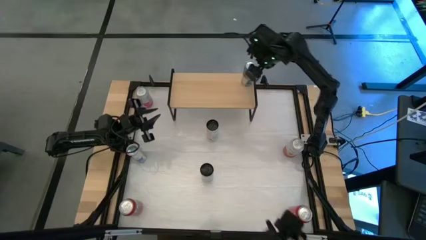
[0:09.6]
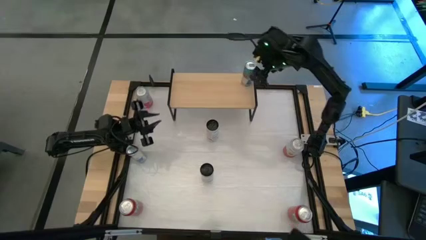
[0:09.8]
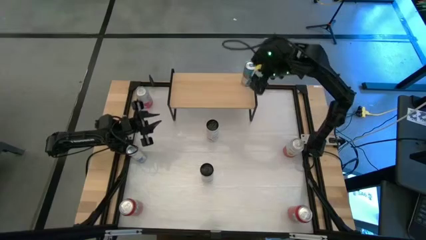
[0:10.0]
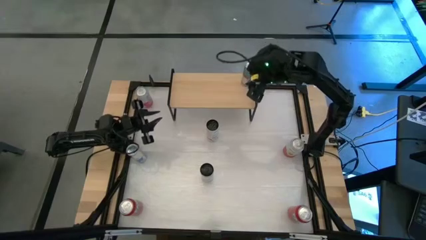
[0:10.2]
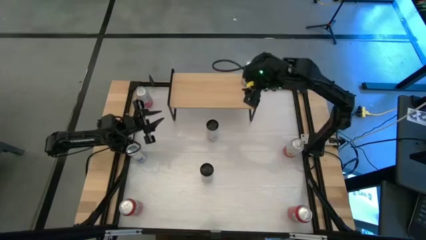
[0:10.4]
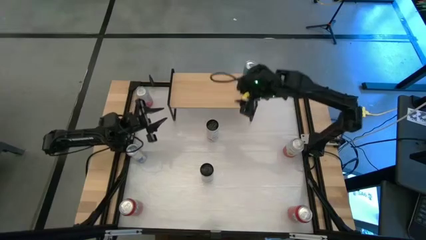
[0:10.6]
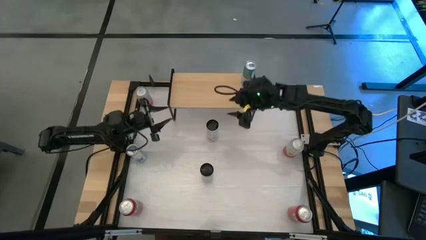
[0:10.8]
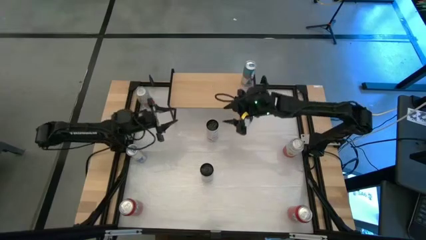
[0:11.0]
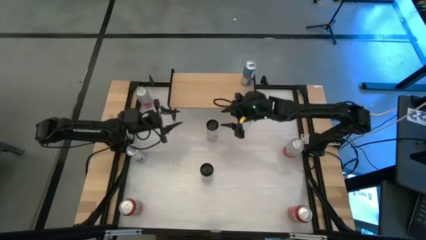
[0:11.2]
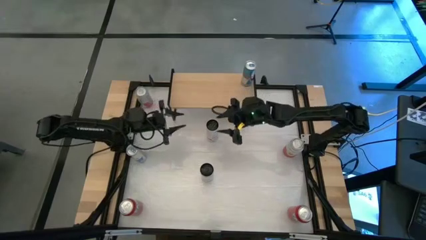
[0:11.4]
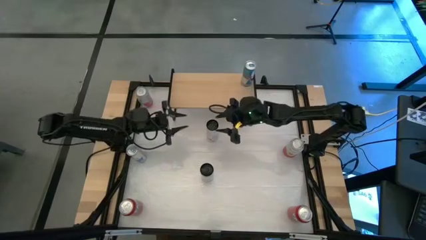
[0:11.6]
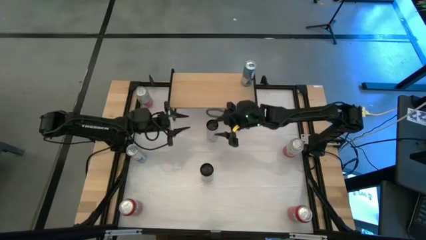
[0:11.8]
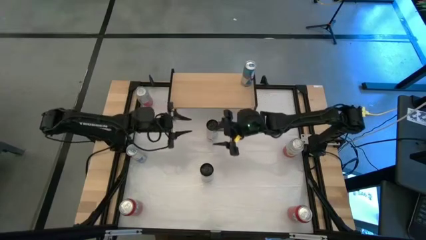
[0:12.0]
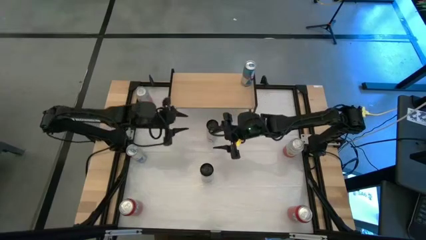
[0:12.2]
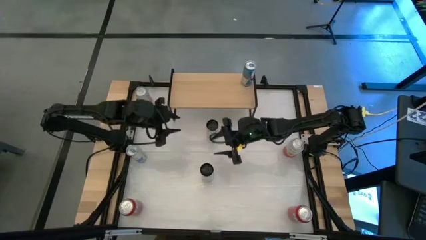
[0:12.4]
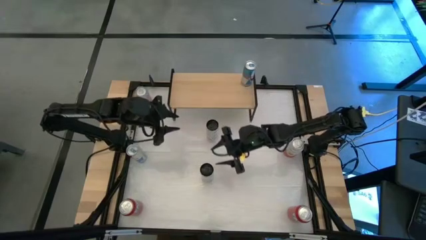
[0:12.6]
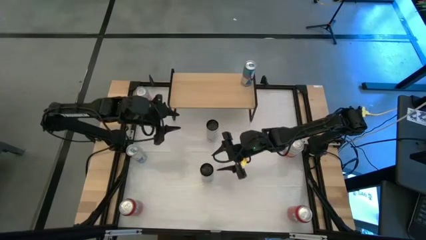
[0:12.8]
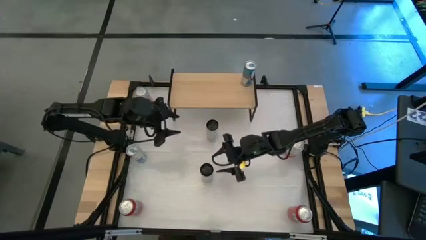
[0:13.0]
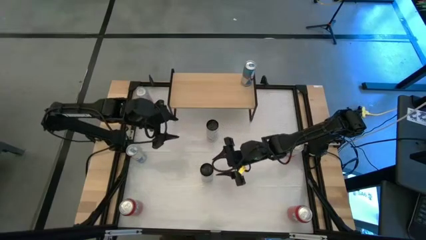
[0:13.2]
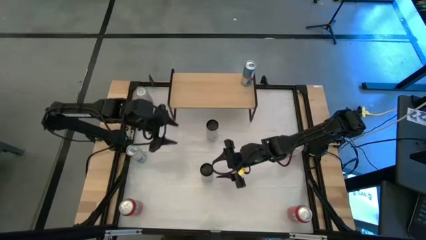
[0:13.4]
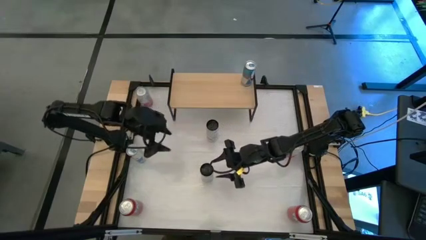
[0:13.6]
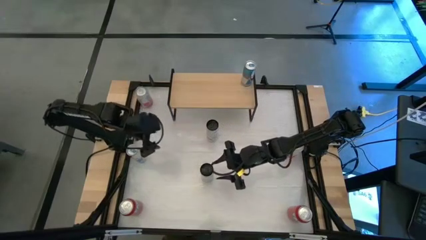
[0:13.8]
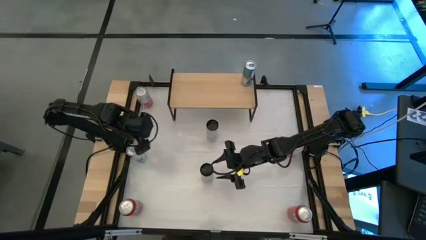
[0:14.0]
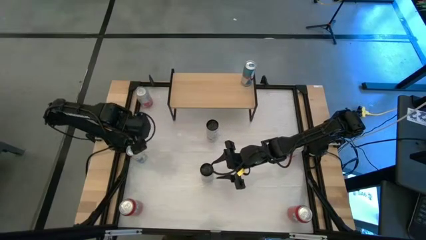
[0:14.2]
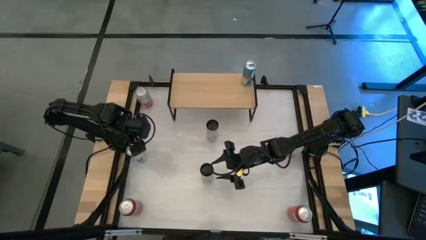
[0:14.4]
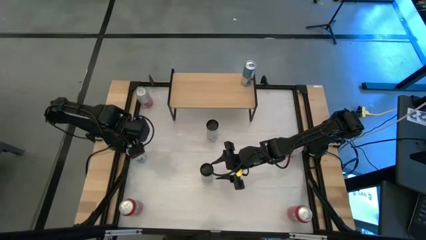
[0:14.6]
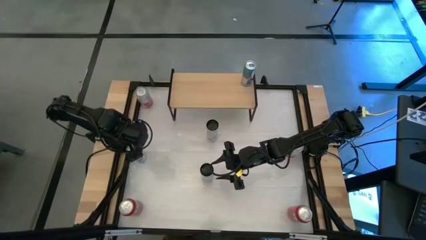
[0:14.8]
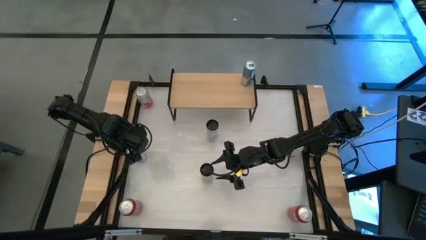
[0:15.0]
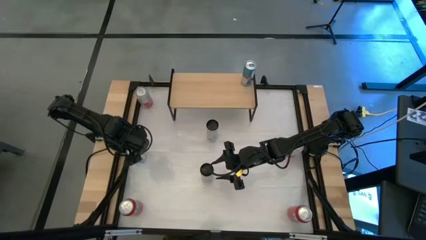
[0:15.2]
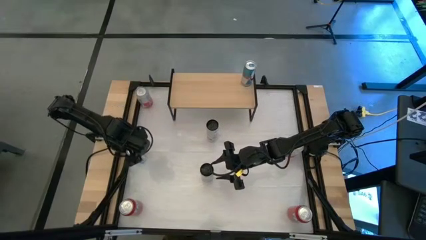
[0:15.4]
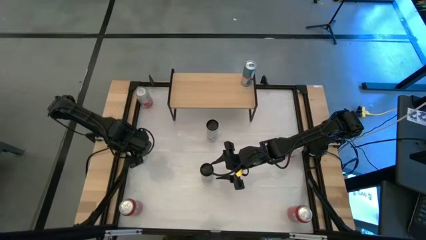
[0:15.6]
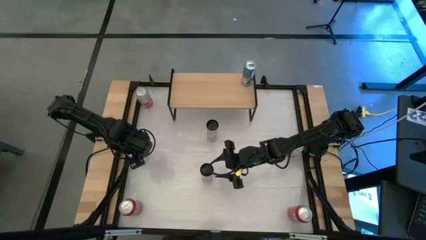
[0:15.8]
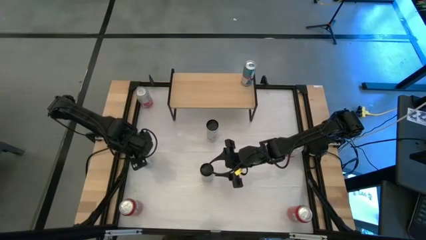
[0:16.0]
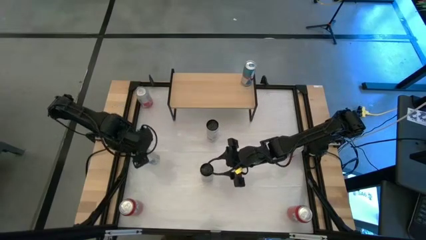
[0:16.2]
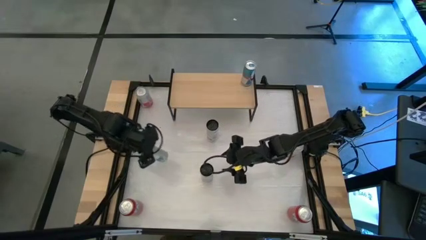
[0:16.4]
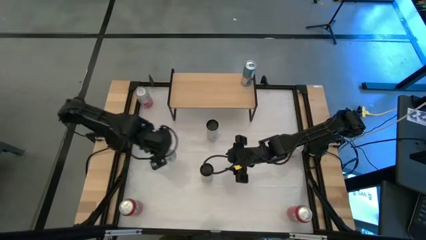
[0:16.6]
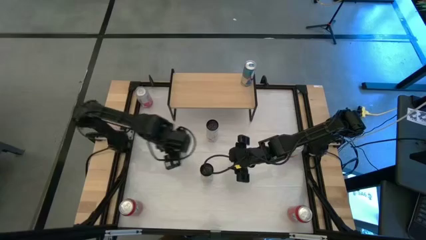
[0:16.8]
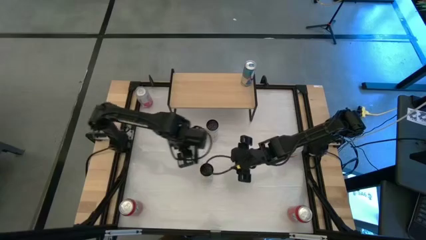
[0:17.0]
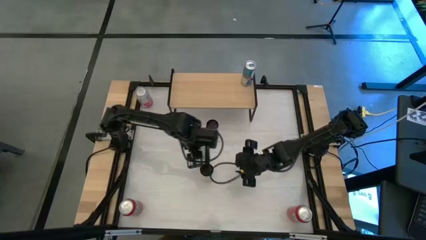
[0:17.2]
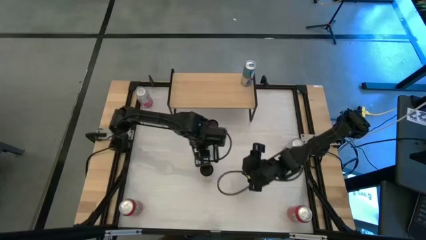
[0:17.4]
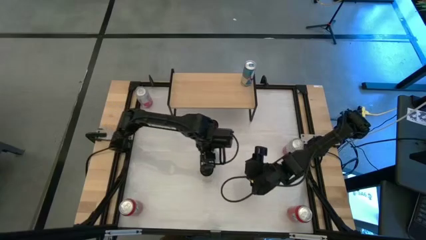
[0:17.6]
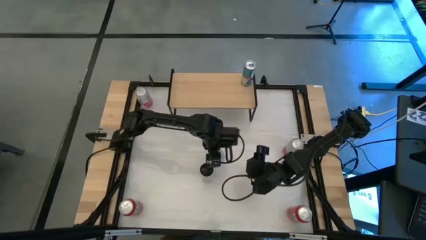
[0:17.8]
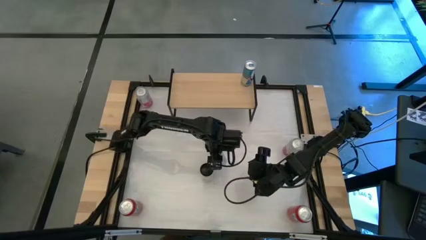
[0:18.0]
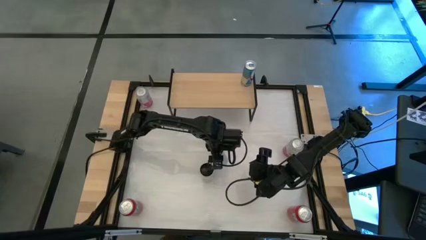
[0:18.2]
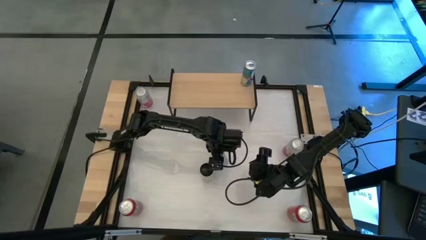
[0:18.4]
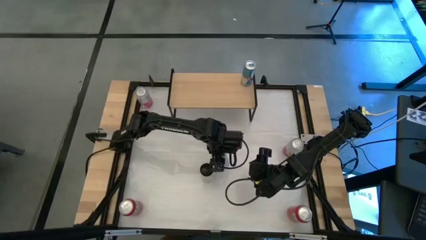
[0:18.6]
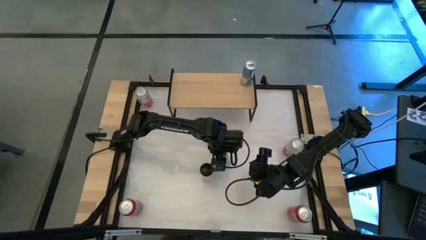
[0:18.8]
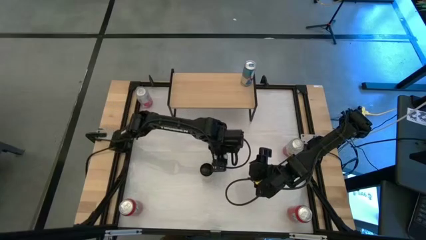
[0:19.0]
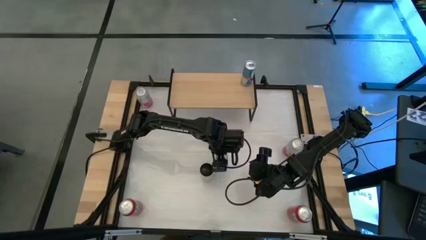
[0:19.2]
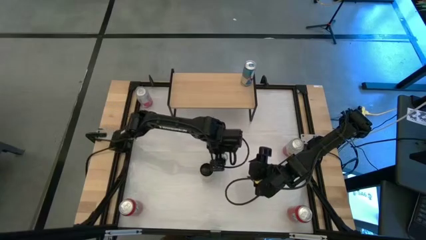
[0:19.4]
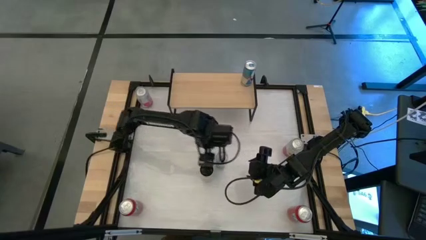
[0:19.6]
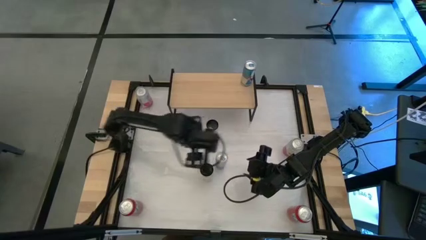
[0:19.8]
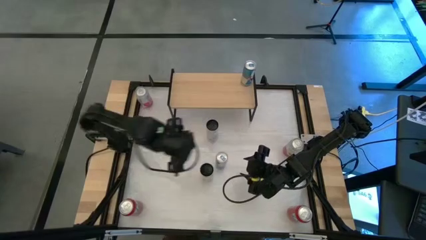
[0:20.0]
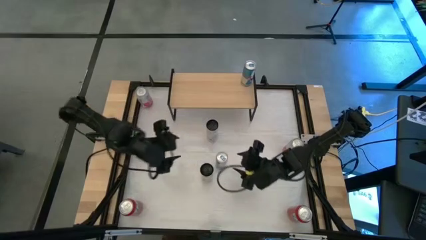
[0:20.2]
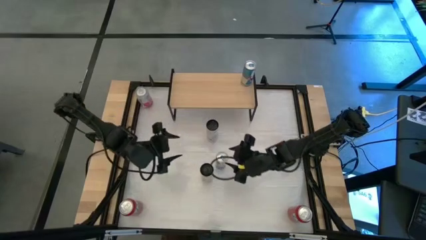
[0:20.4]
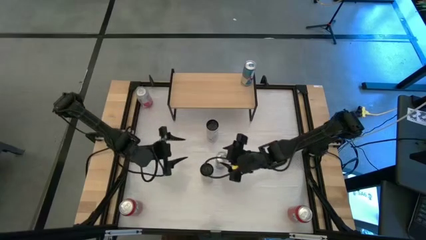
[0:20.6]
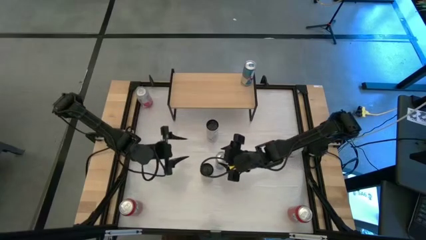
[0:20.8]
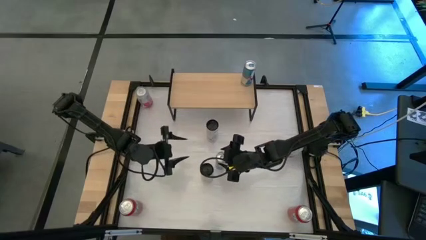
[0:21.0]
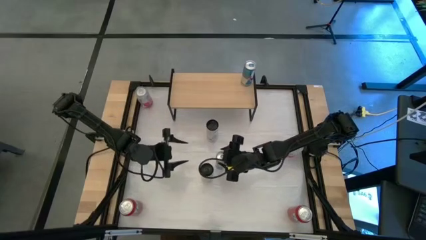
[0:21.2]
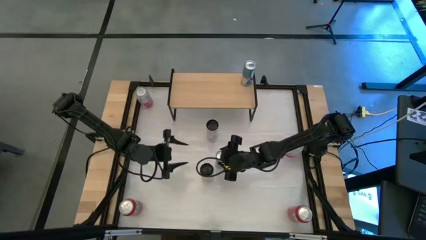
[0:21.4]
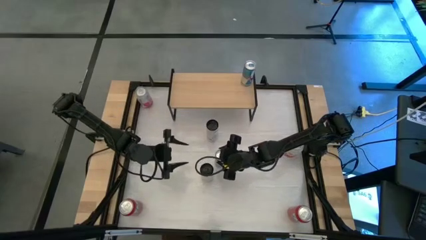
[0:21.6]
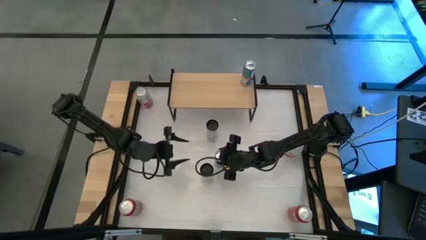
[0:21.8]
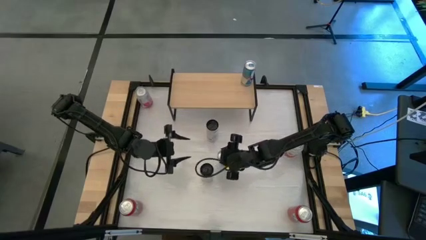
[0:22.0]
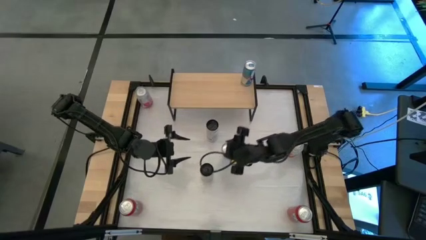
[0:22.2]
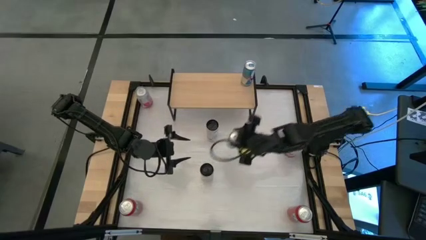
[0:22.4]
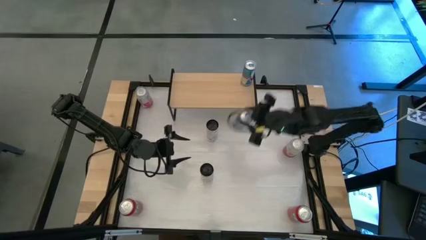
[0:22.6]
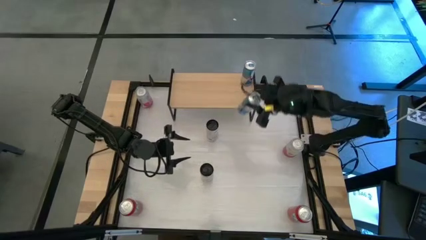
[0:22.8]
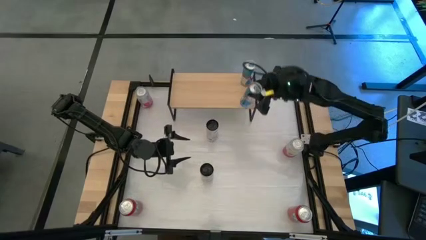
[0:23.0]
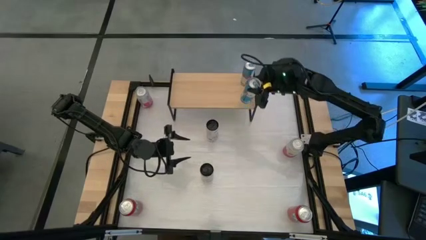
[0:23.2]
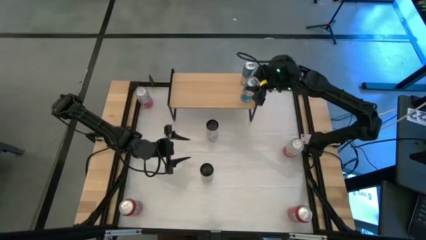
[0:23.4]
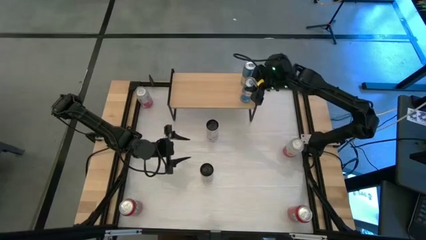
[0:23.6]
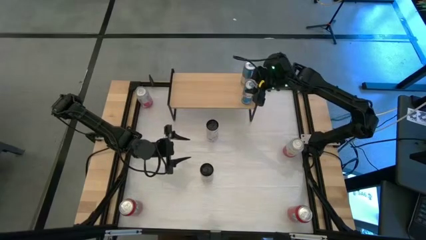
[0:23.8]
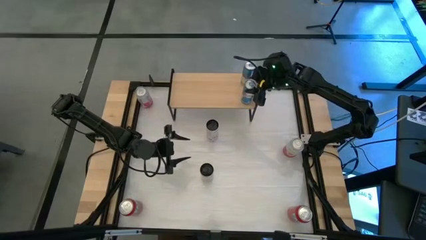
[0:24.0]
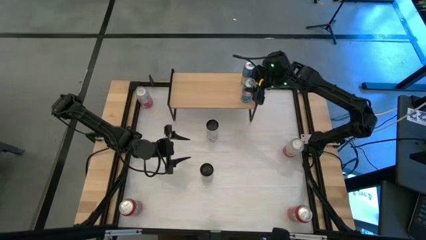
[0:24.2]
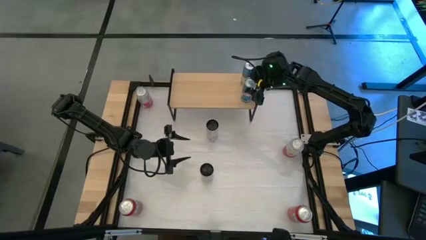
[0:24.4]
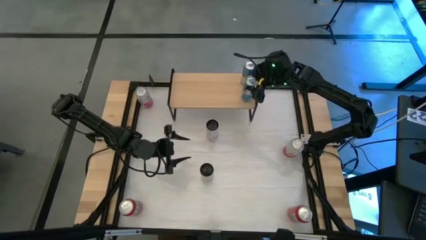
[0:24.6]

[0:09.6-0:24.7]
Task: Place canned beverage on shelf
Put the blue soda can on the shelf aligned with the other blue soda can
